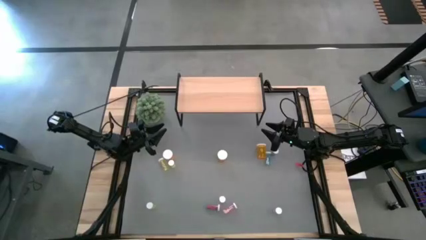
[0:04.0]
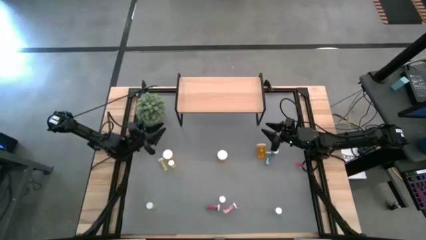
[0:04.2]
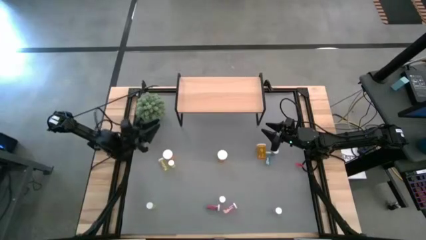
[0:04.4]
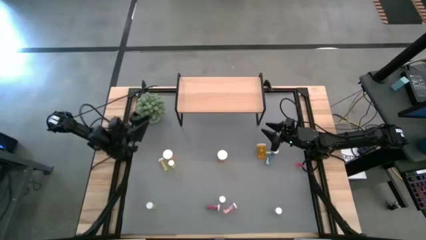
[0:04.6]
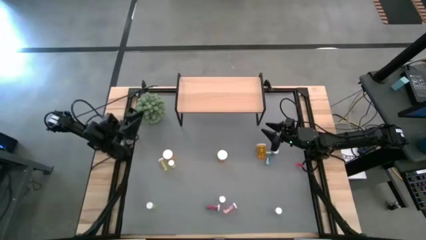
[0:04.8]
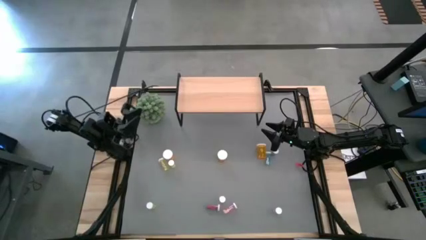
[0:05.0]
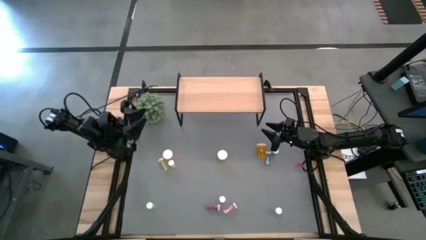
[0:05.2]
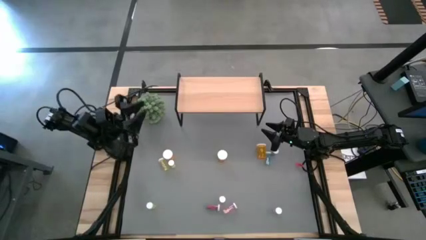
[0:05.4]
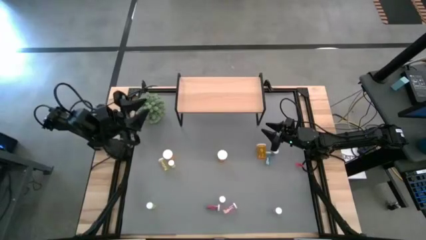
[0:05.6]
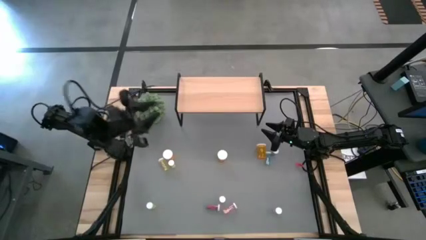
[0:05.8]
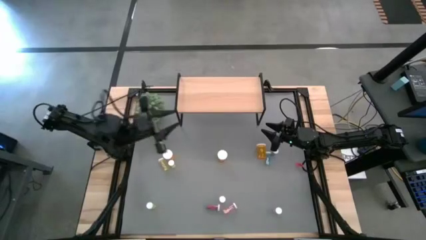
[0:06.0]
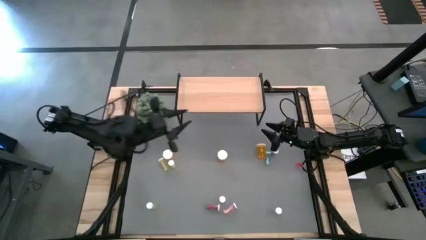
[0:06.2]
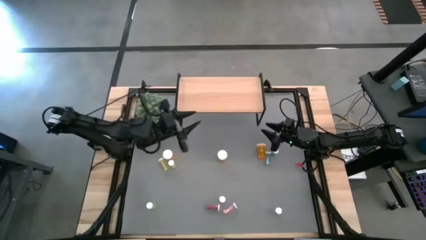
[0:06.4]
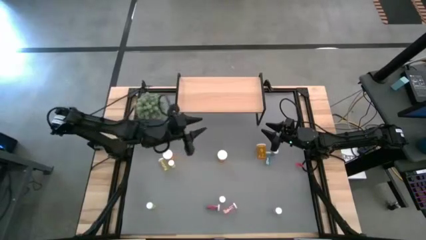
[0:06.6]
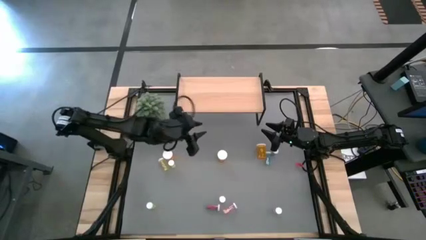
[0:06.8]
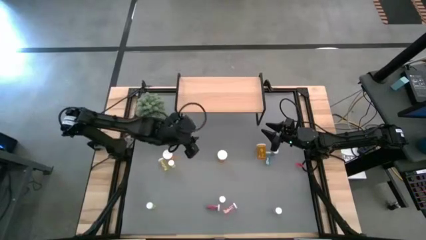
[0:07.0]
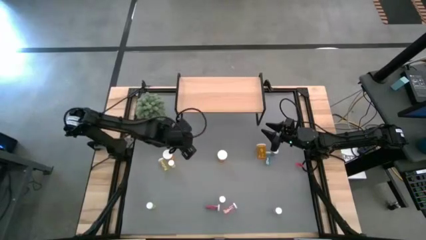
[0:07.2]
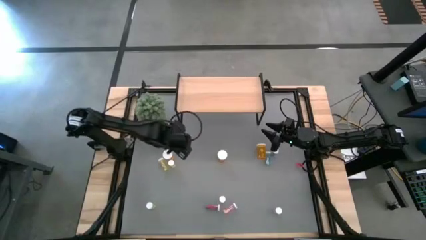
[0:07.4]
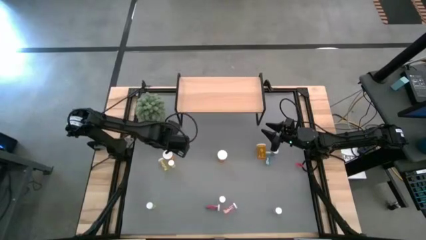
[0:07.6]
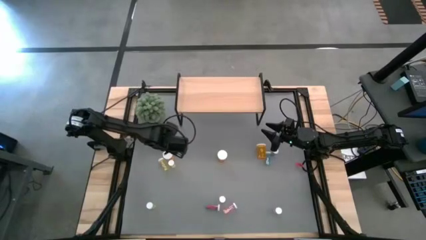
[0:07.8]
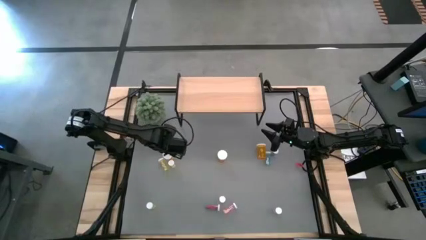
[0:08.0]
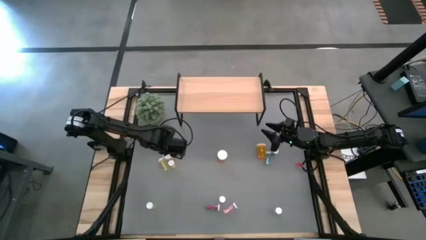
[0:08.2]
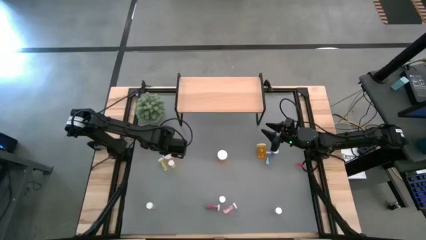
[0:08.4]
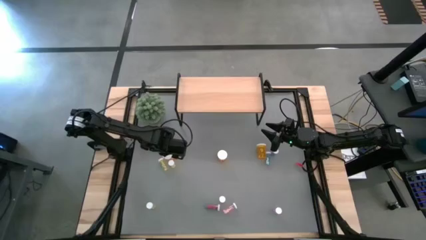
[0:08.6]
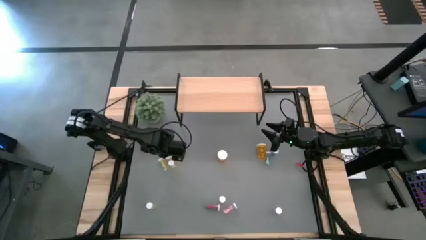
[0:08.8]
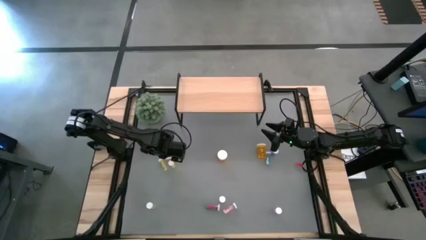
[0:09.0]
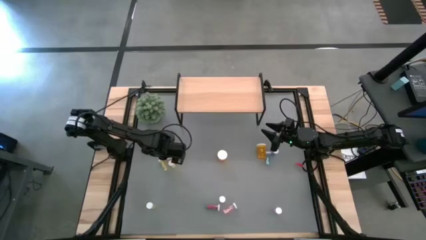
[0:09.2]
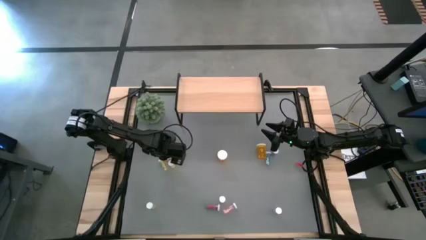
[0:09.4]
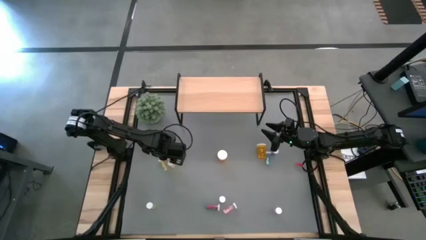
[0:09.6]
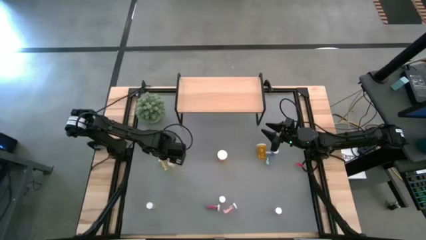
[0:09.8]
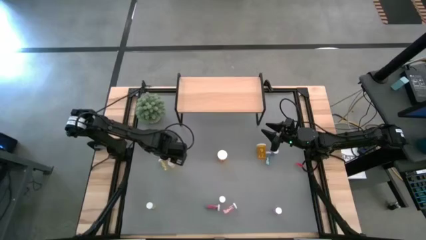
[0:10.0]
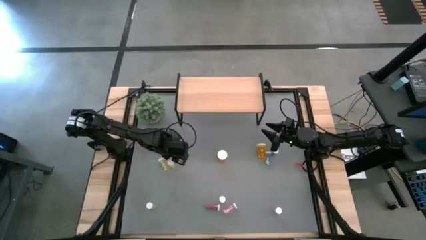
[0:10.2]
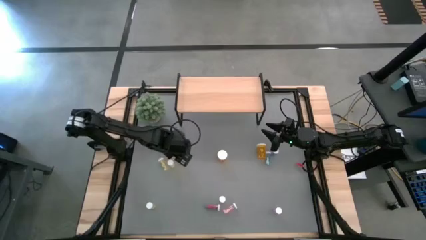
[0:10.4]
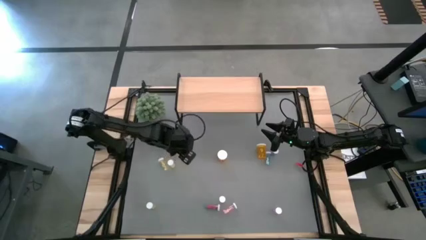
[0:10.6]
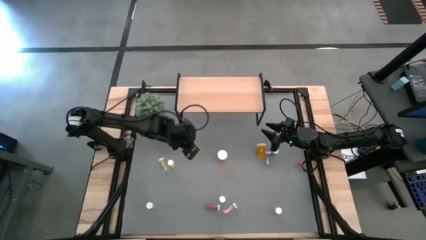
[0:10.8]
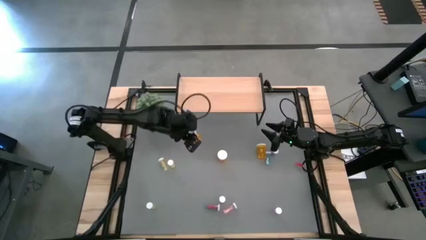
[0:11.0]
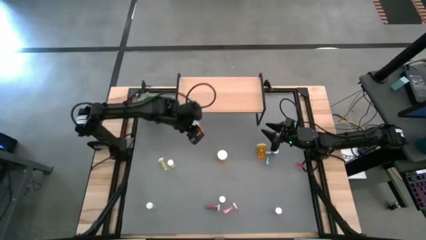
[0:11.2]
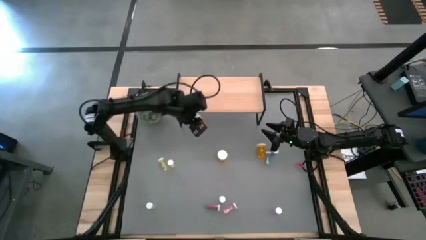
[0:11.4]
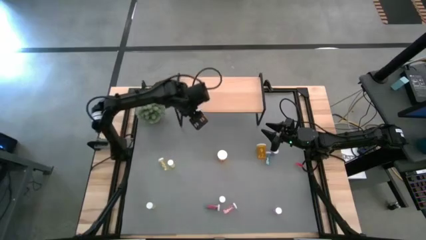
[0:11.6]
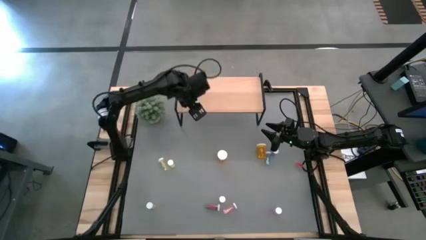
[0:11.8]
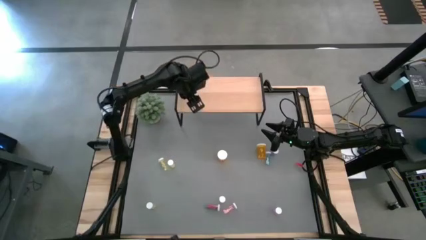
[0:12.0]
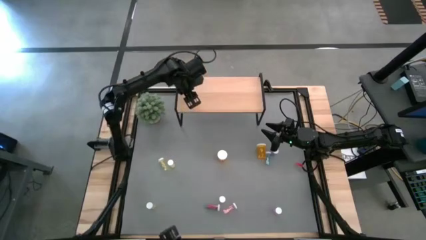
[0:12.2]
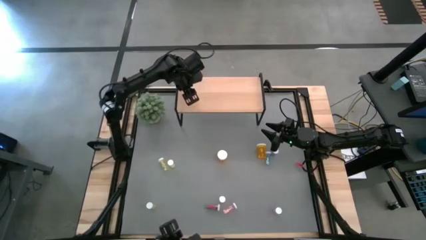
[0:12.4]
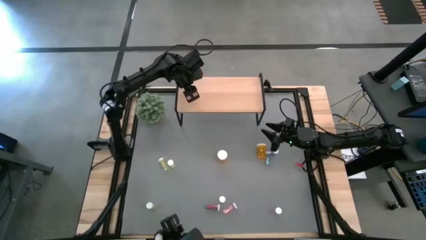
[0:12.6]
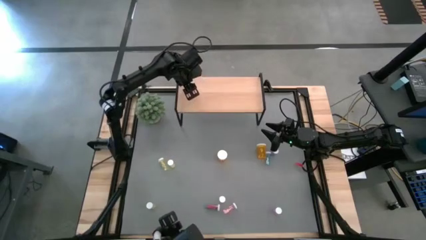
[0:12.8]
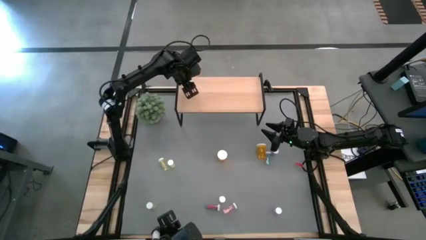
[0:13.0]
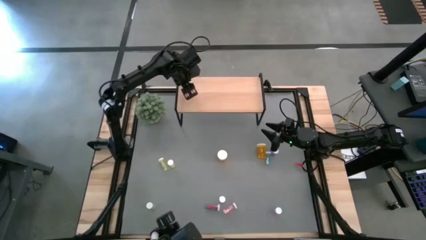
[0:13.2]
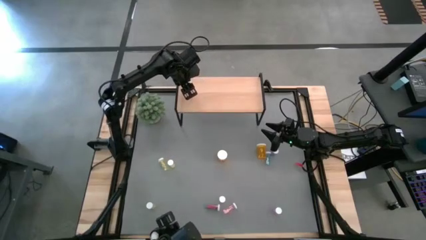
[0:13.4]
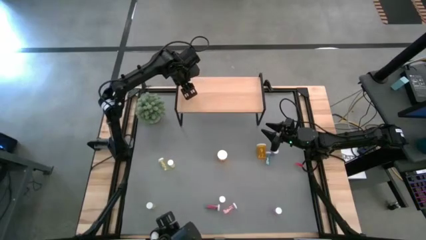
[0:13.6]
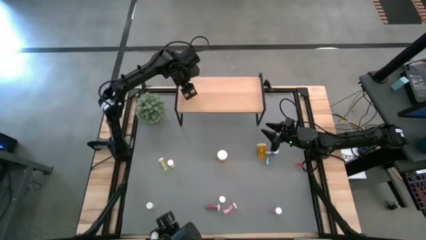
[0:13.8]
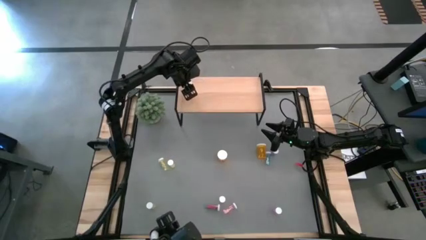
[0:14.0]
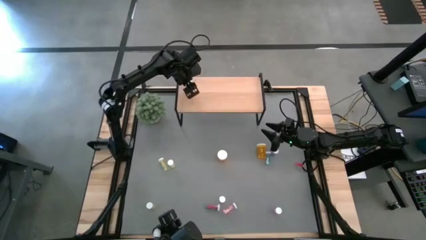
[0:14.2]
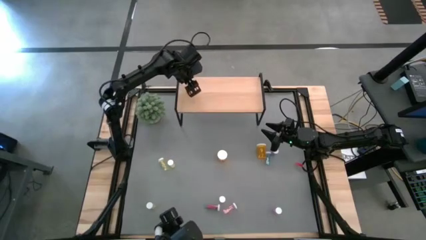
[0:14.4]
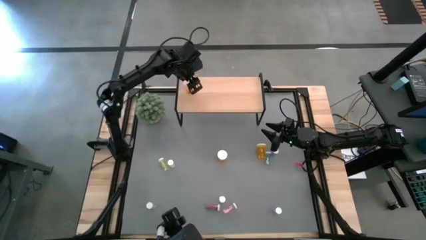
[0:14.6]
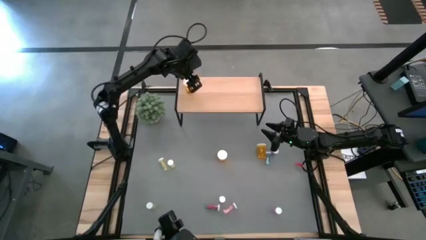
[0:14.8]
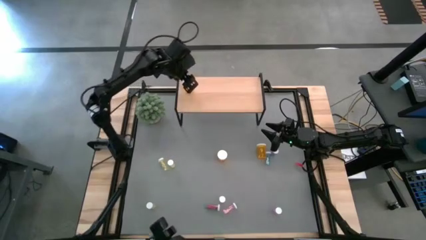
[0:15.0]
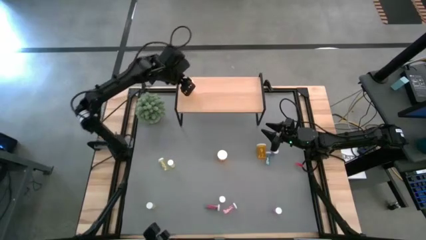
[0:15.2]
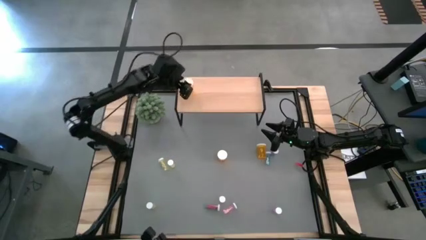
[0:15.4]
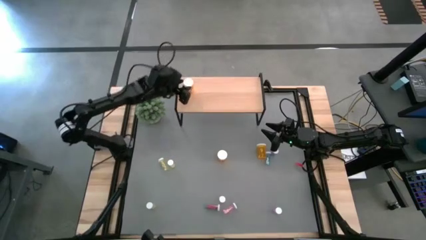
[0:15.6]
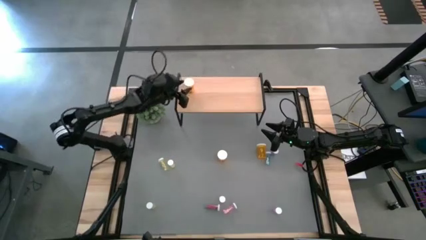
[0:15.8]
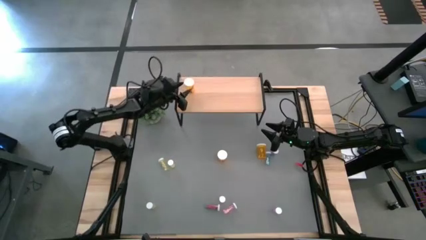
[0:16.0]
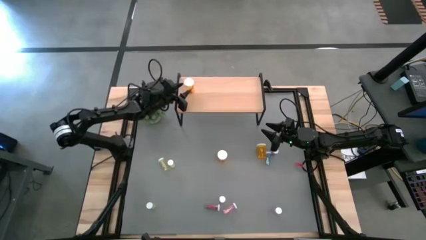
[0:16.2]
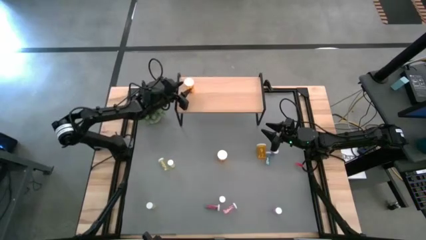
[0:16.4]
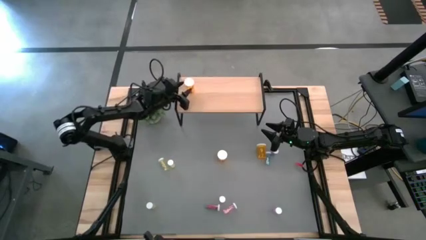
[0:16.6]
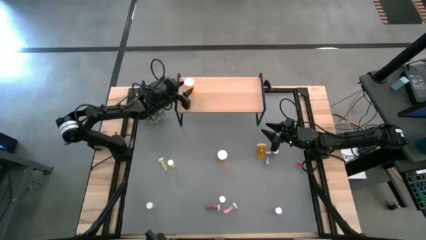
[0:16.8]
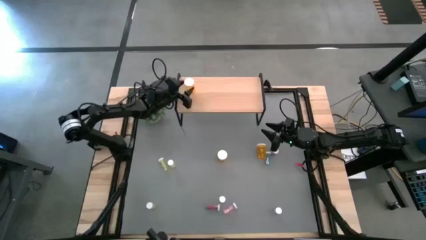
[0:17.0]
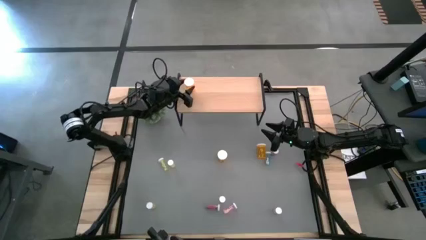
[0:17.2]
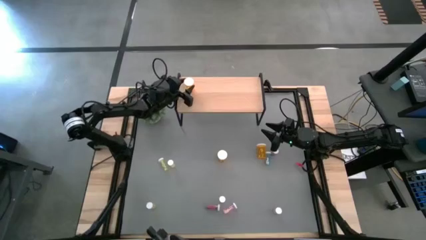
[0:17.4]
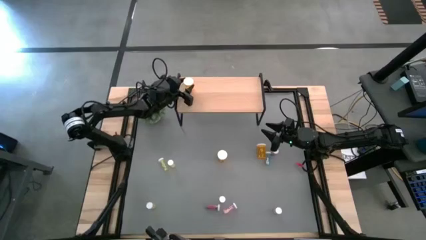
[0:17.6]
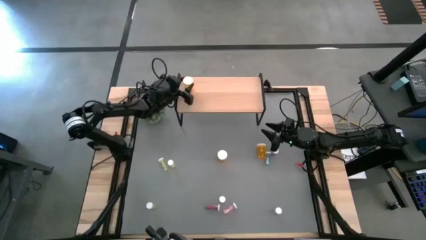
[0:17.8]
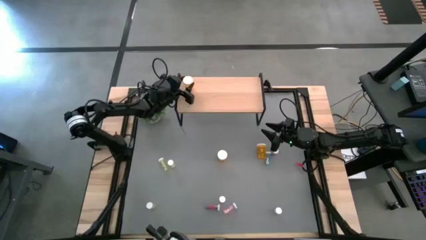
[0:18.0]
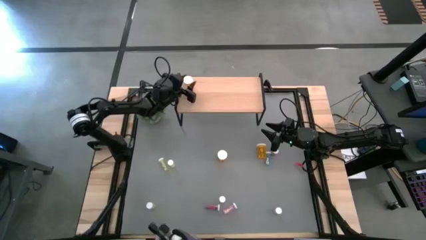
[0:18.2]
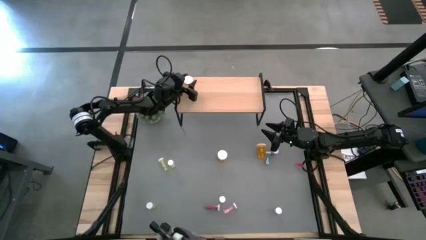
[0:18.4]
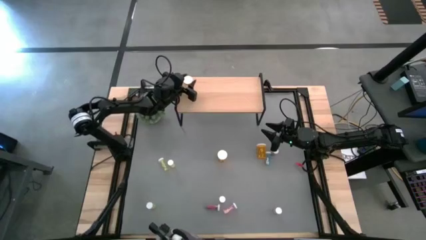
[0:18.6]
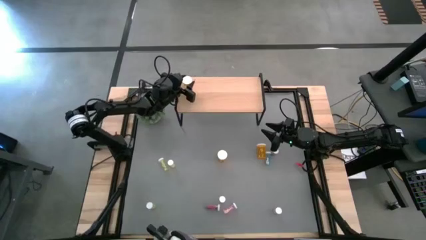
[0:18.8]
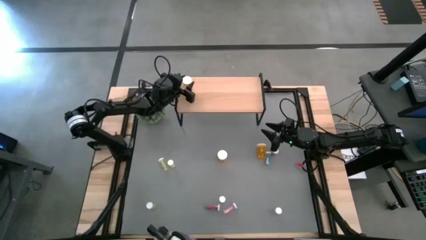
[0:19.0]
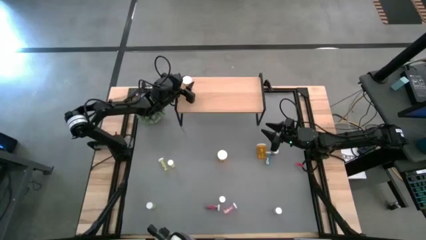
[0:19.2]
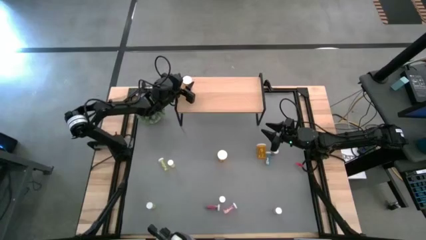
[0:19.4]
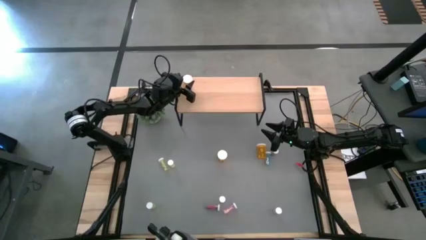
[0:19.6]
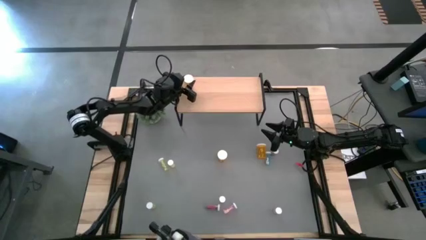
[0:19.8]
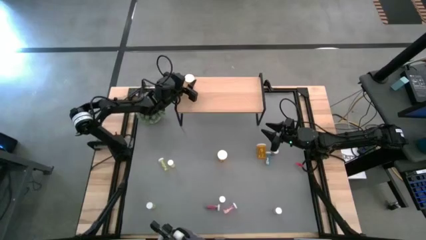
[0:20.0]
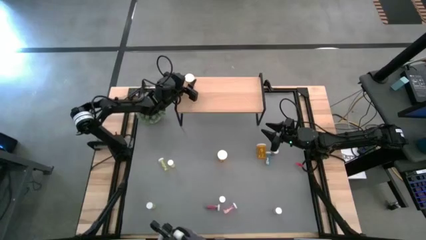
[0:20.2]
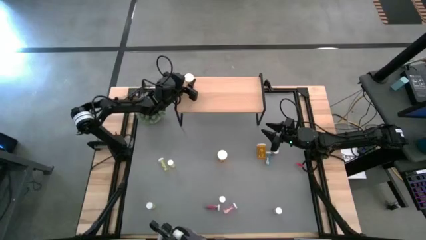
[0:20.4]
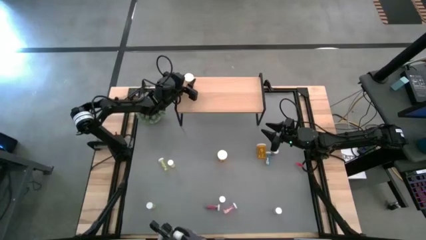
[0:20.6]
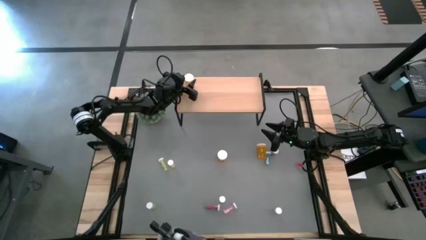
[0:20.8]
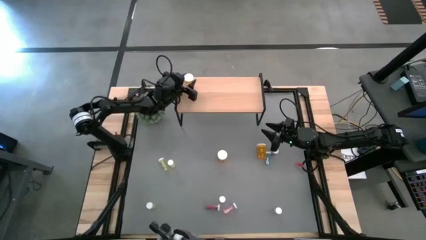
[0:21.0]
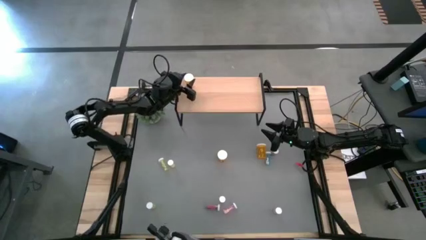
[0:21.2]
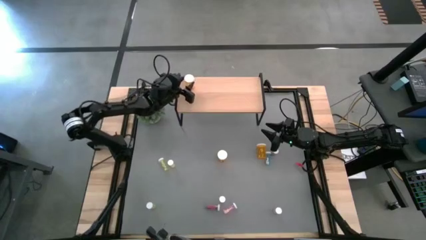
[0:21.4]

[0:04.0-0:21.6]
Task: Pick and place medicine bottles onto shelf by color
Put the left orange pill bottle on the shelf
